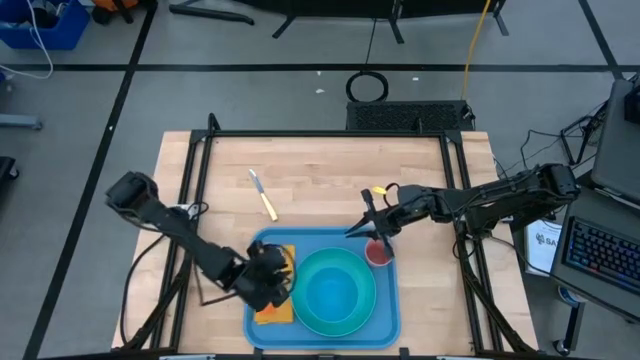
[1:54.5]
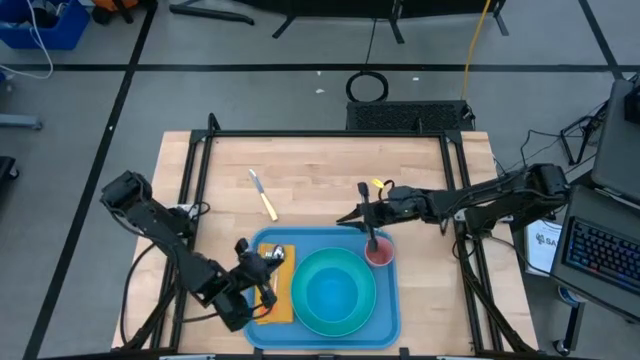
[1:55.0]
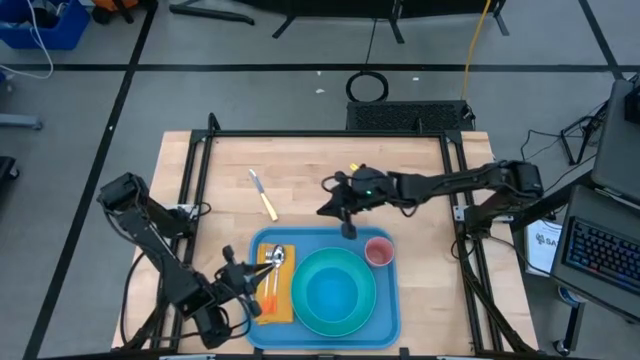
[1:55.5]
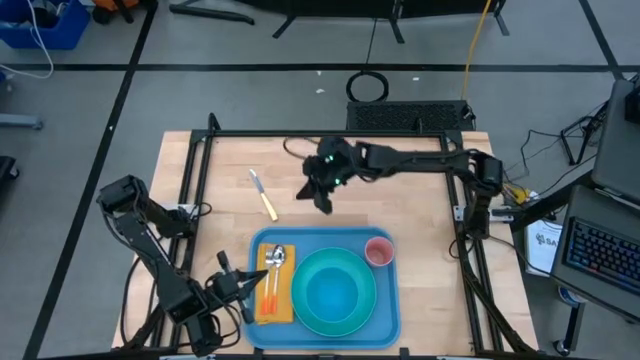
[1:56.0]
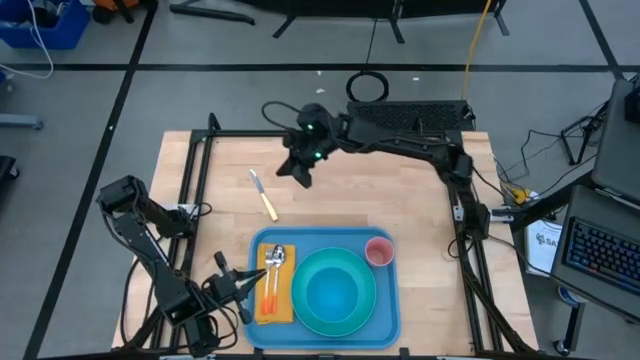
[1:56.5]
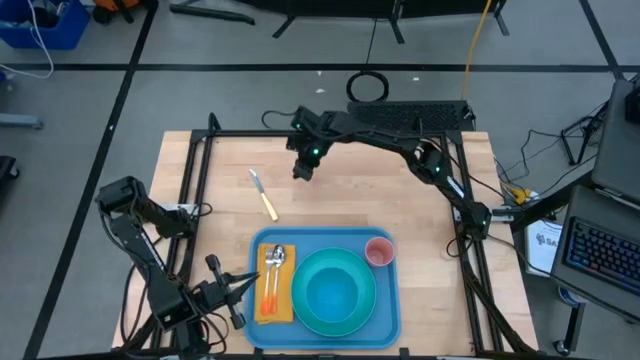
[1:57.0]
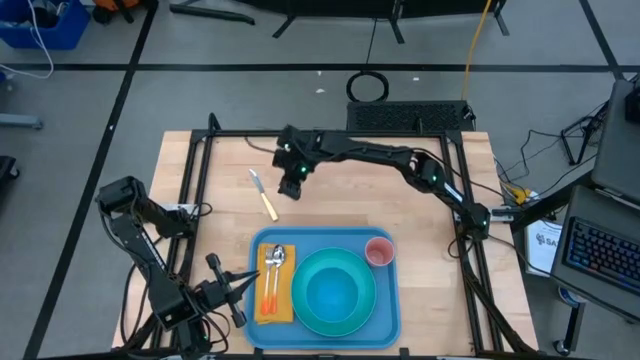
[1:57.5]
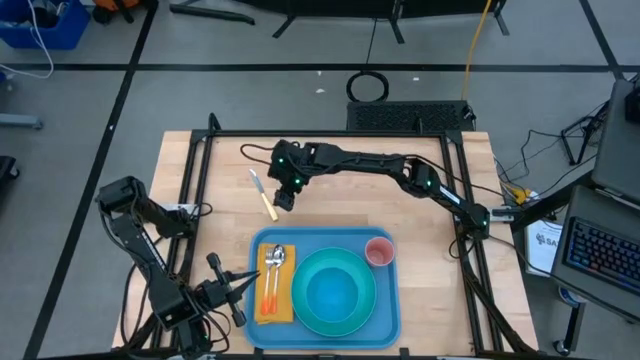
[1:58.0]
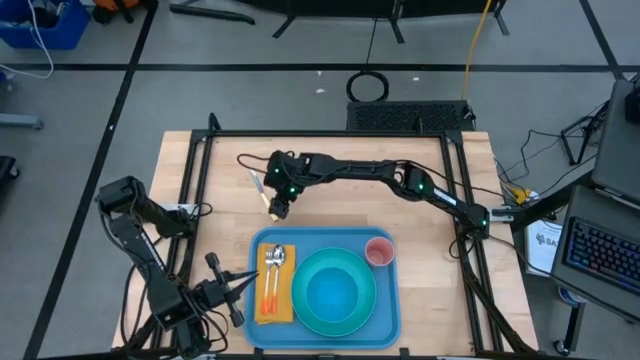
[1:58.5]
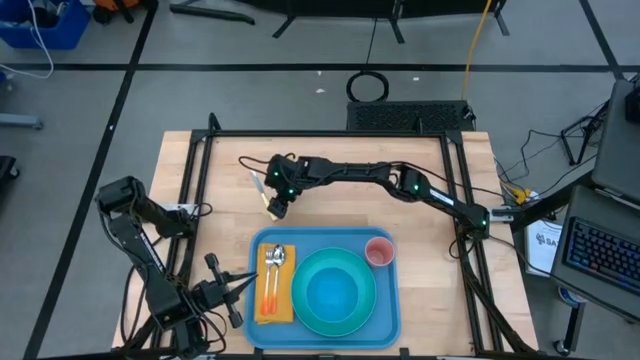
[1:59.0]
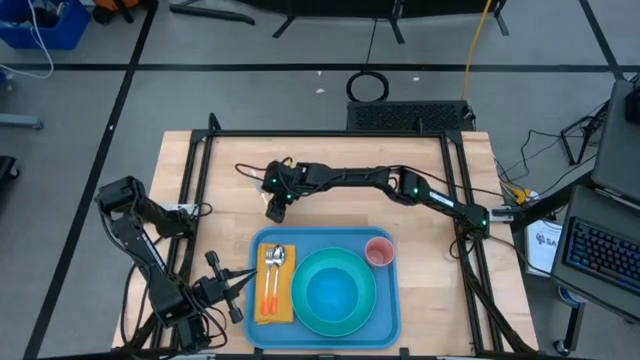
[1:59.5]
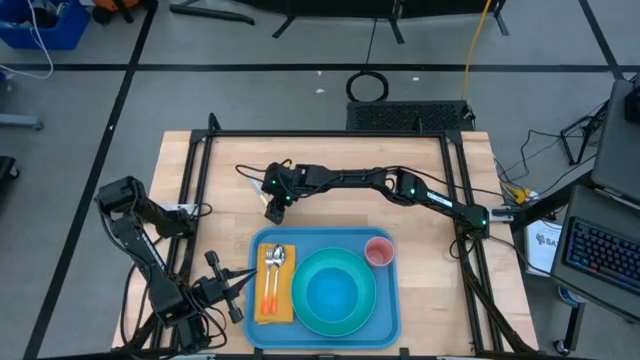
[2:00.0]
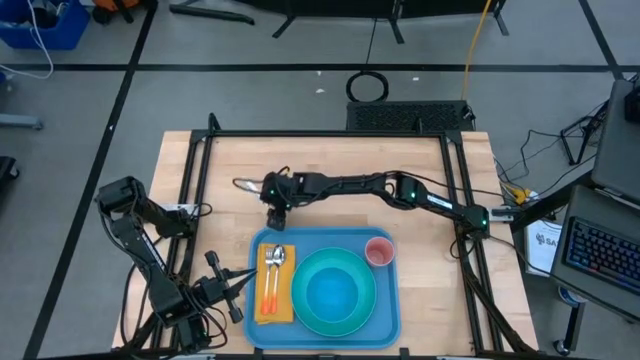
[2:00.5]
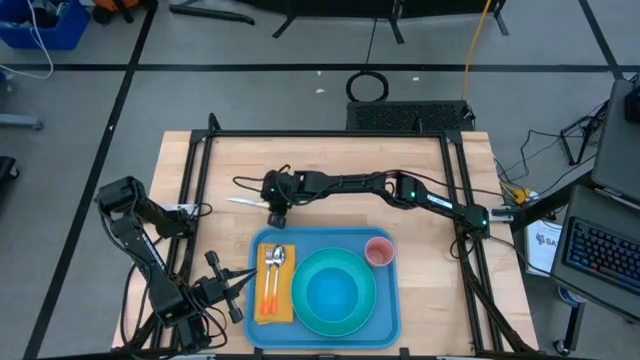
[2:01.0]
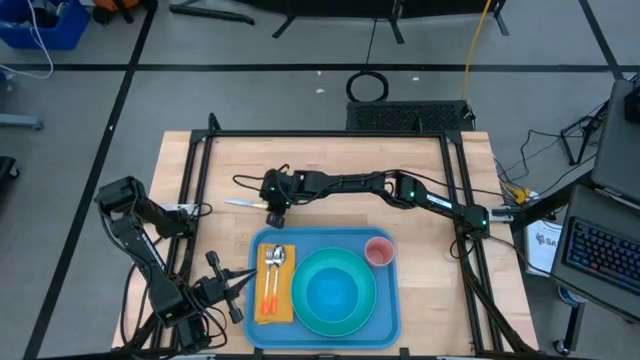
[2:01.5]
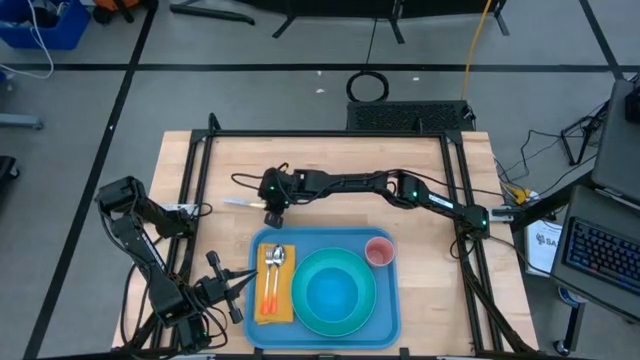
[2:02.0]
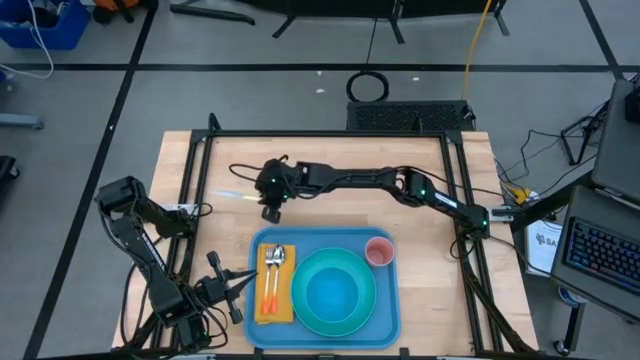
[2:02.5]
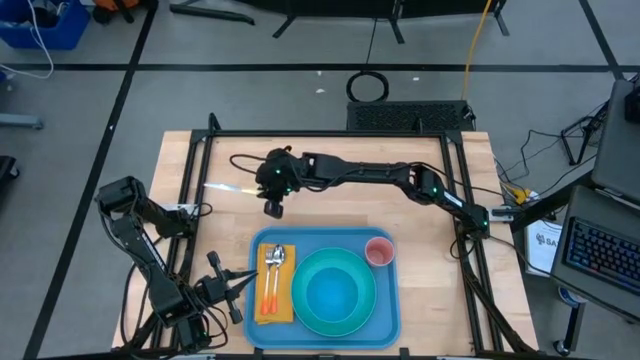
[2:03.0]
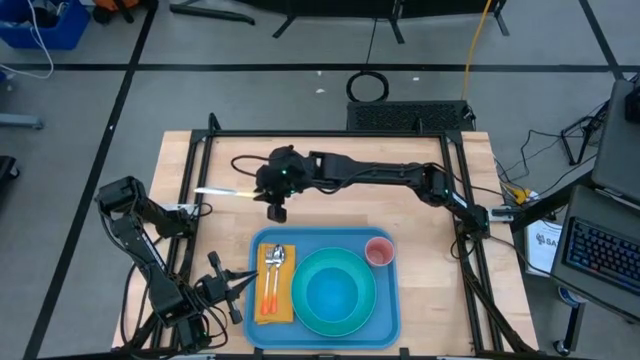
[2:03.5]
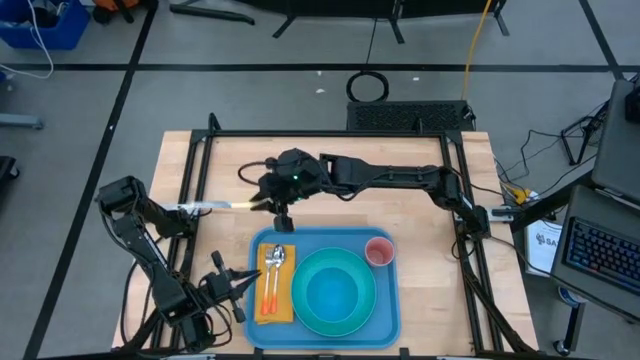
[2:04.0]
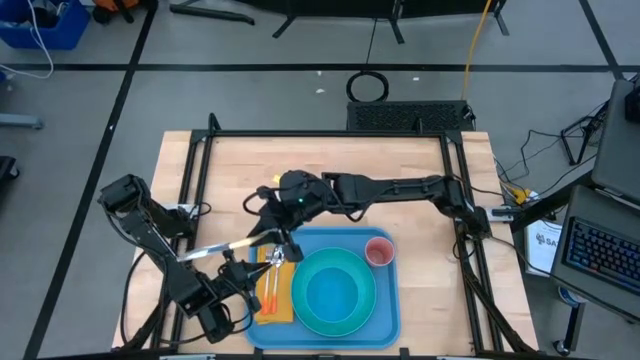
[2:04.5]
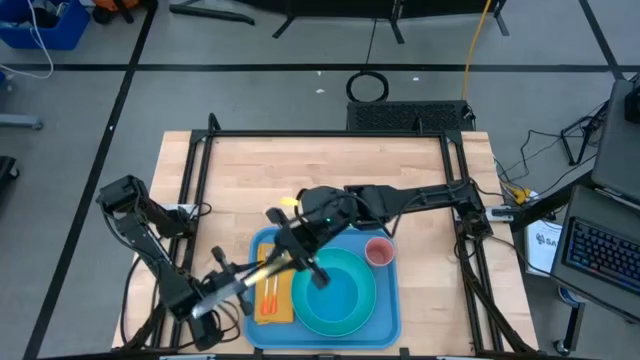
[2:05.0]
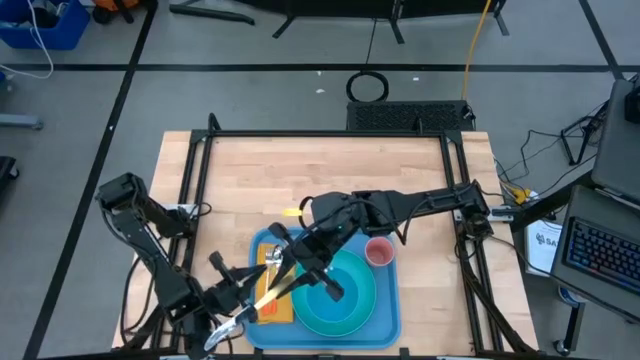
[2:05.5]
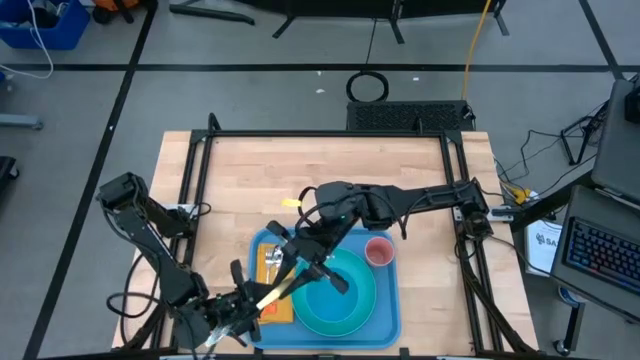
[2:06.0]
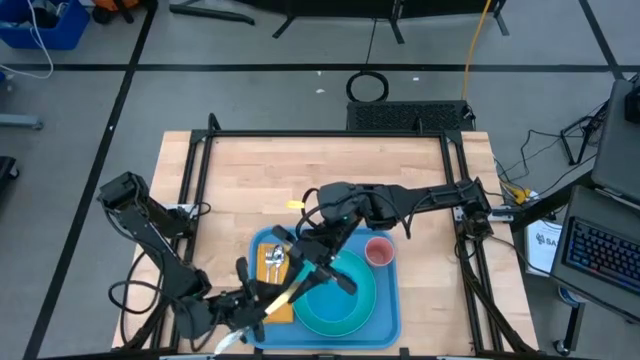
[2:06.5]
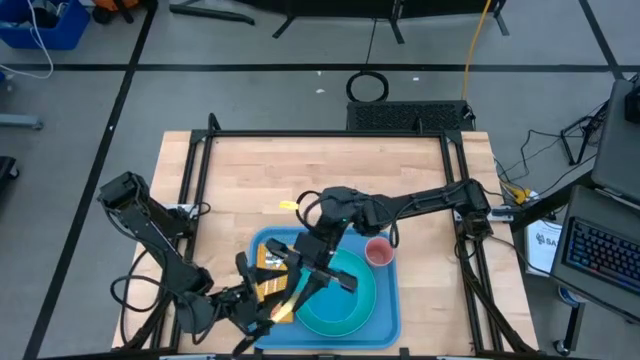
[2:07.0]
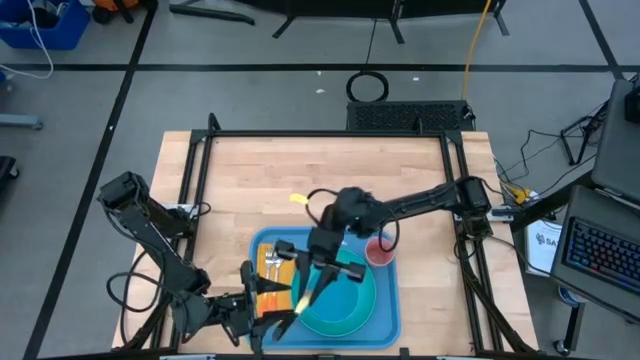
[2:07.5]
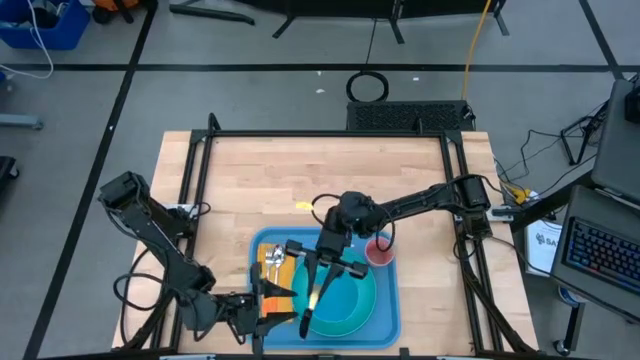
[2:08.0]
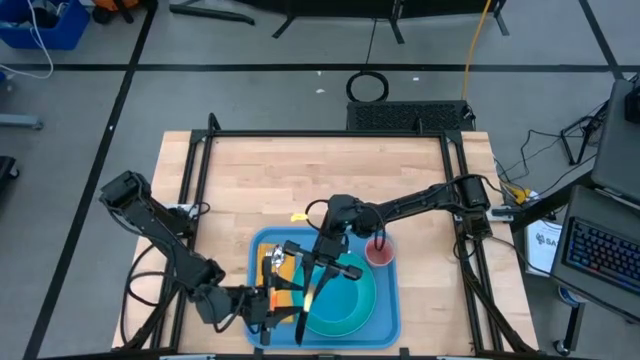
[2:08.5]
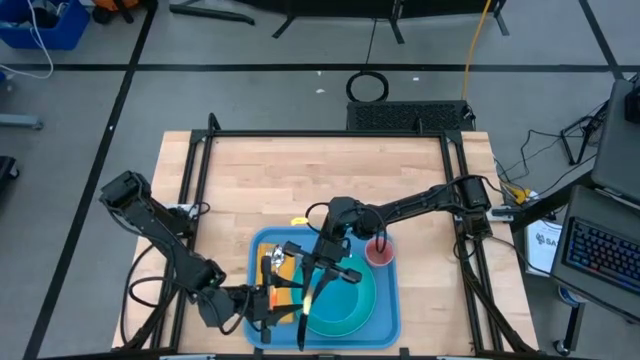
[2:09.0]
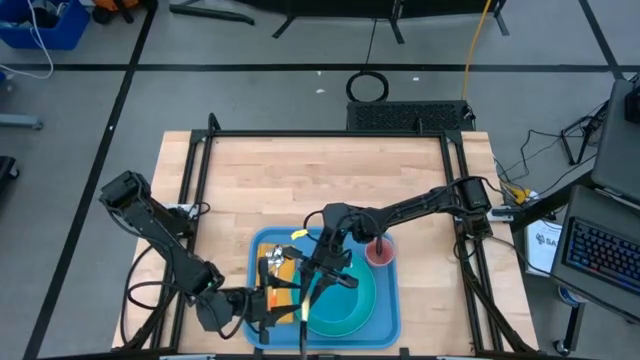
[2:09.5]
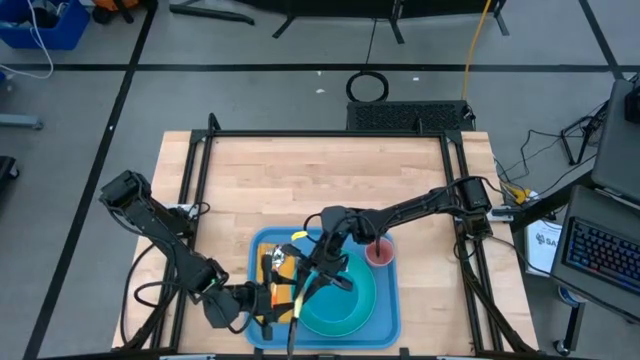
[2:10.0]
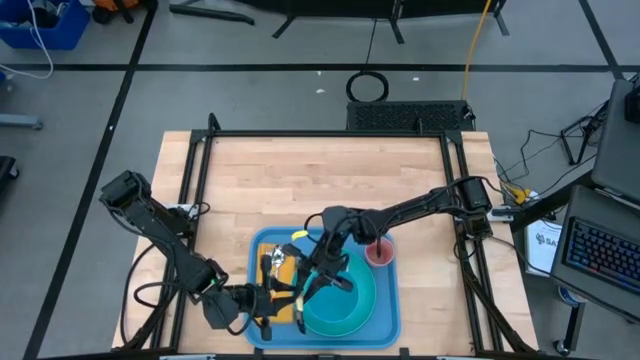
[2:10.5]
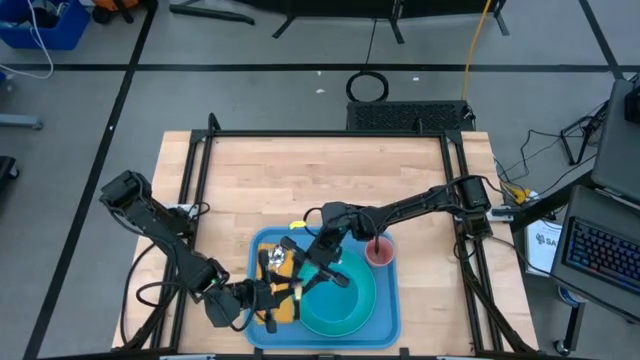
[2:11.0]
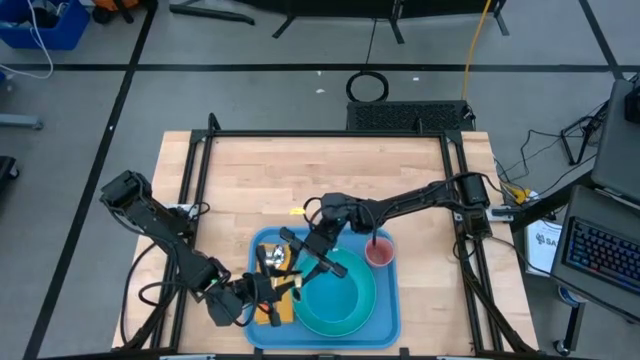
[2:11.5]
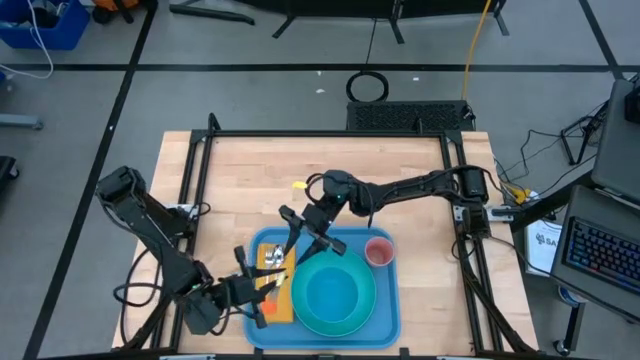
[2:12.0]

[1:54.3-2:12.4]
Task: Set up tray
Put the yellow knife on the yellow napkin to the right of the orange spoon

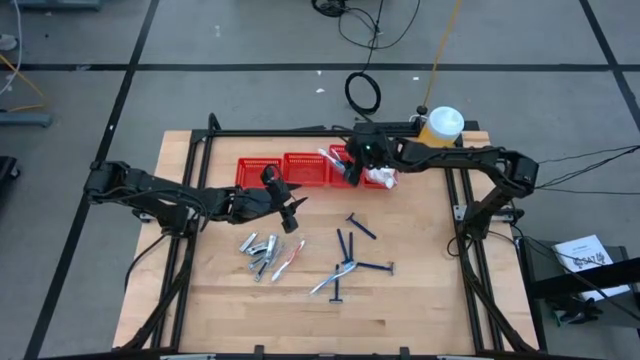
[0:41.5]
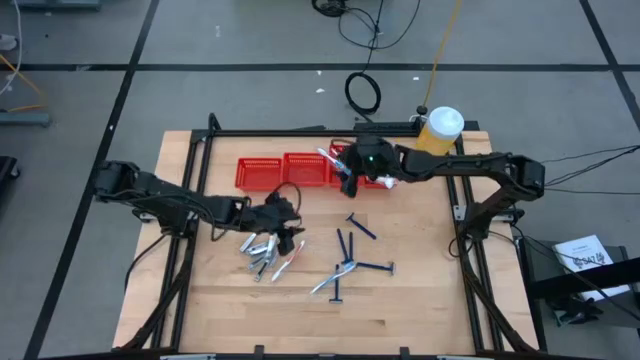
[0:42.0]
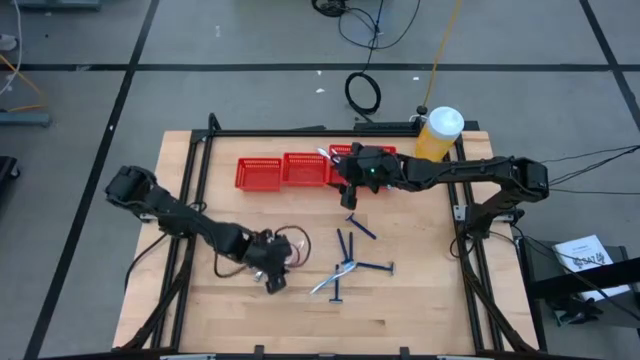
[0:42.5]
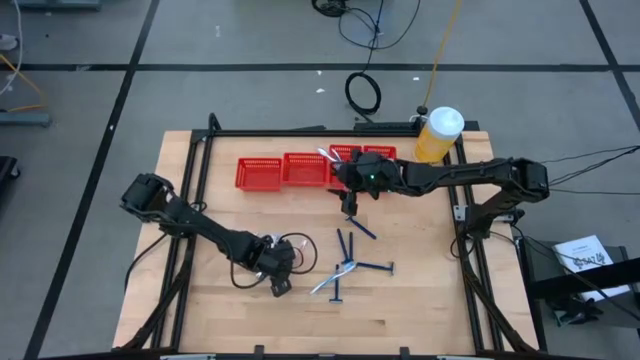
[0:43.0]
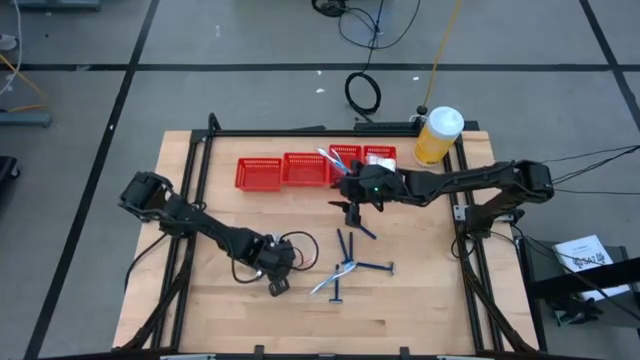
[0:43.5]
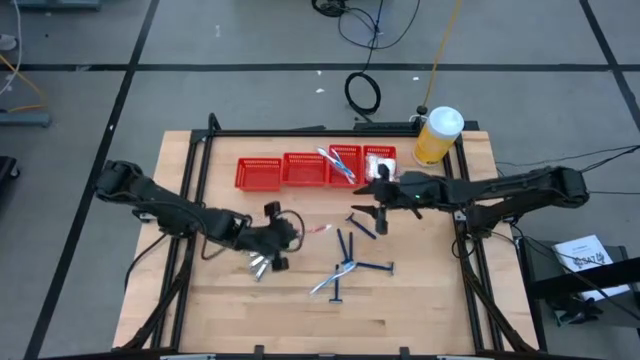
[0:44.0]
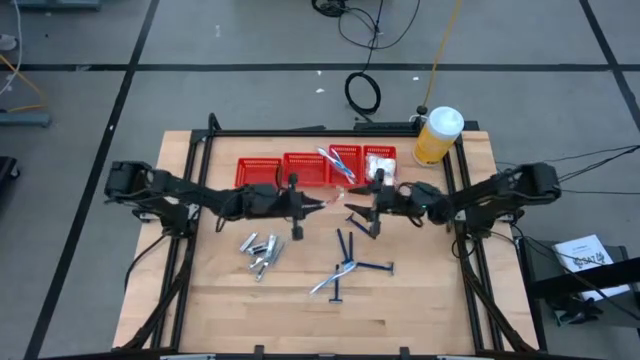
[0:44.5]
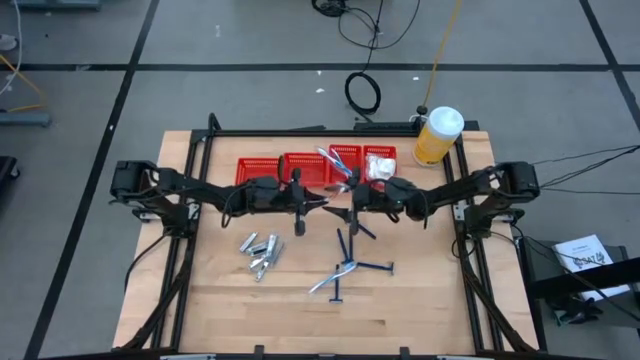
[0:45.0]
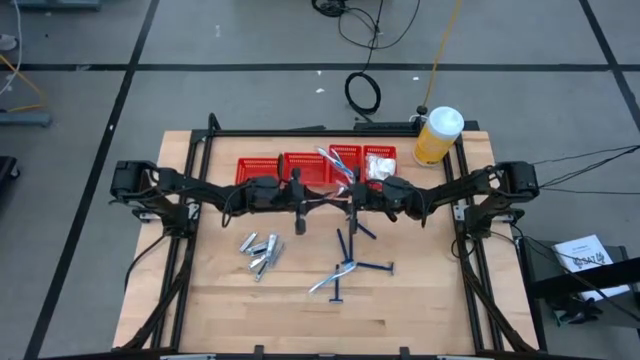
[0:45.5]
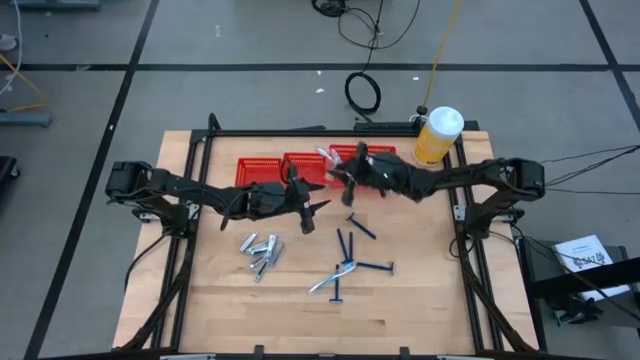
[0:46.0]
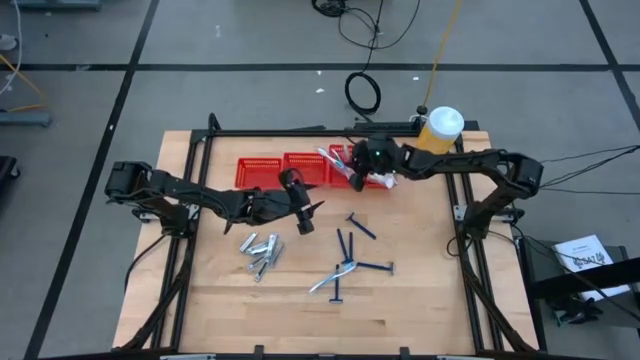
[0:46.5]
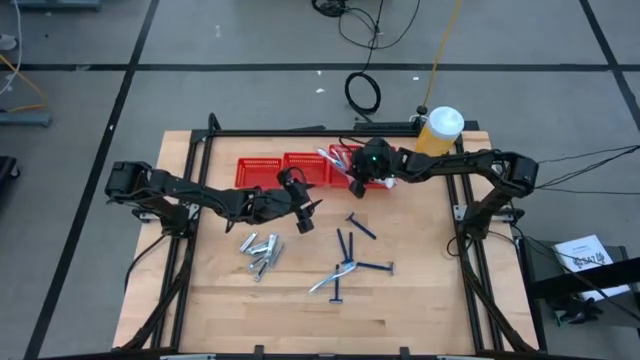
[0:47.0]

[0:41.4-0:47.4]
Task: Pick & Place Travel size toiletries
Put the red toothbrush into the vertical left red bin
